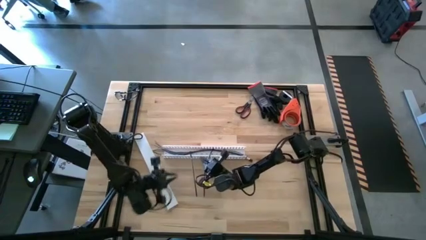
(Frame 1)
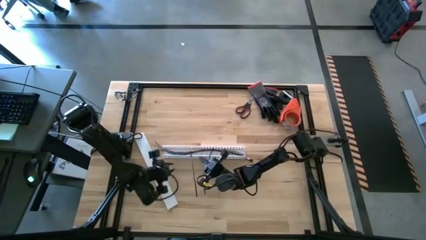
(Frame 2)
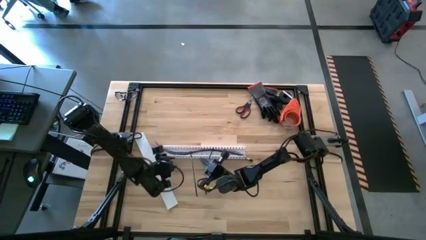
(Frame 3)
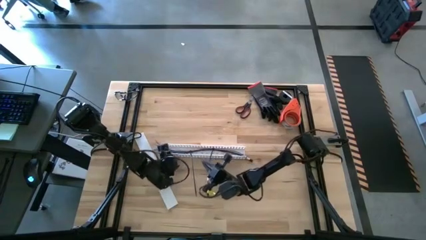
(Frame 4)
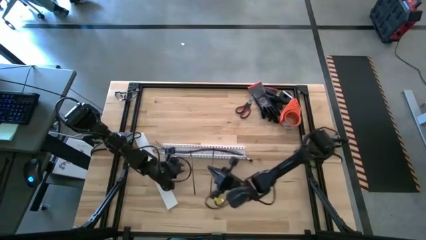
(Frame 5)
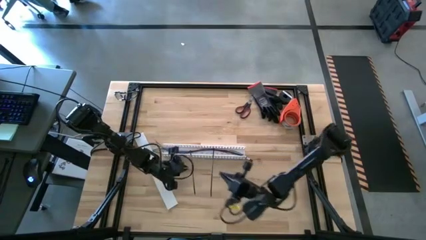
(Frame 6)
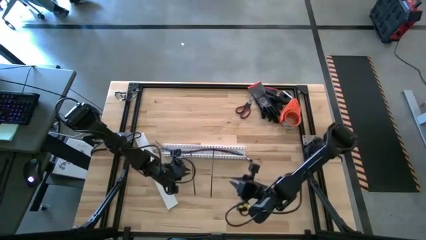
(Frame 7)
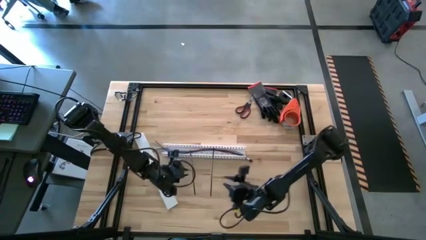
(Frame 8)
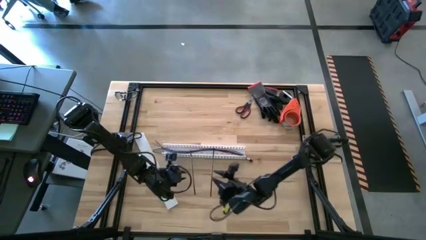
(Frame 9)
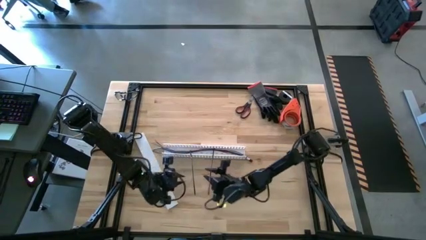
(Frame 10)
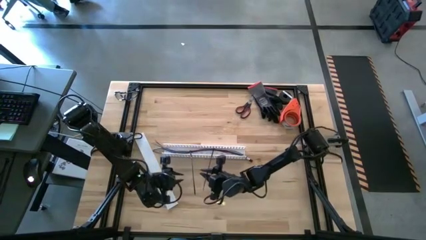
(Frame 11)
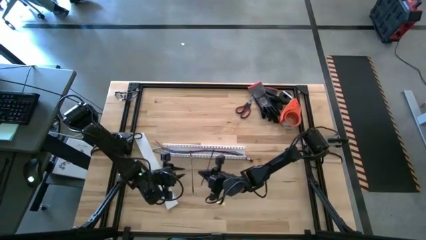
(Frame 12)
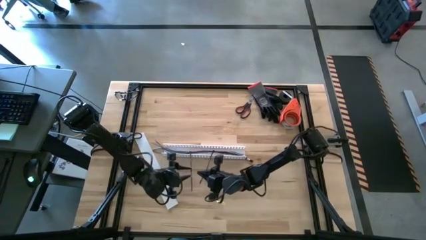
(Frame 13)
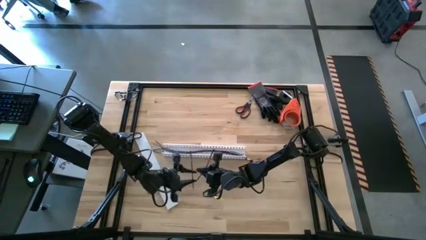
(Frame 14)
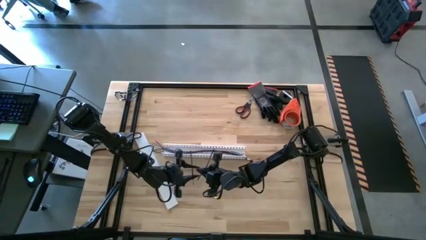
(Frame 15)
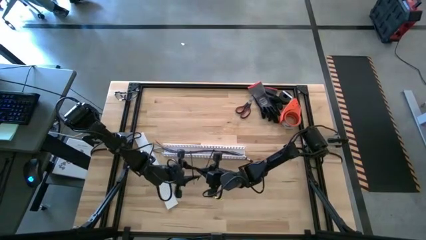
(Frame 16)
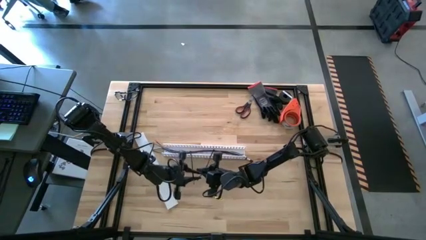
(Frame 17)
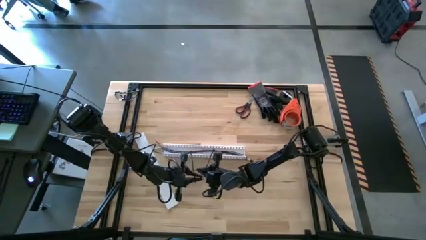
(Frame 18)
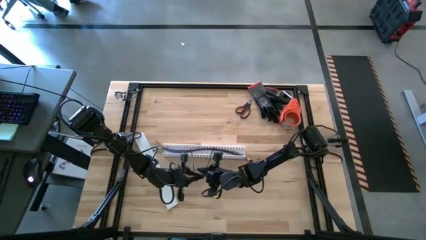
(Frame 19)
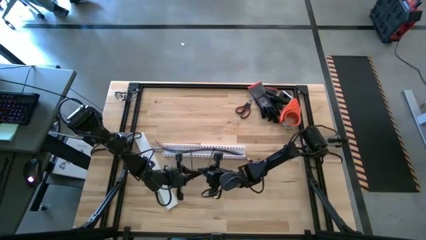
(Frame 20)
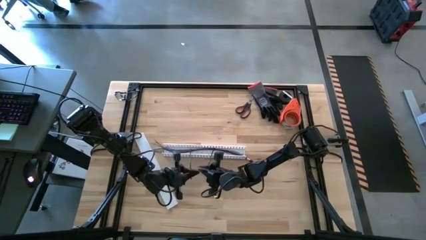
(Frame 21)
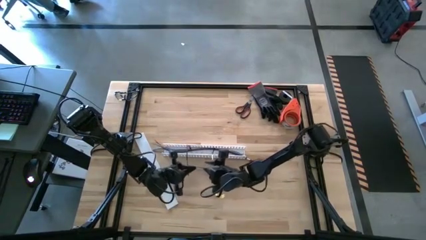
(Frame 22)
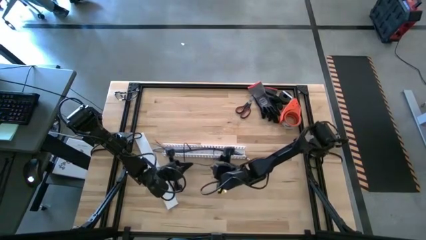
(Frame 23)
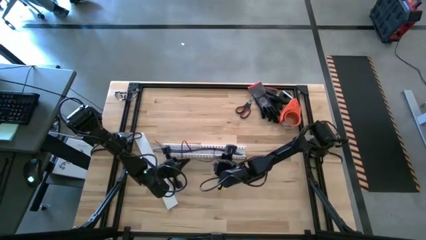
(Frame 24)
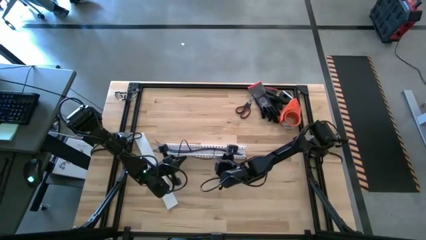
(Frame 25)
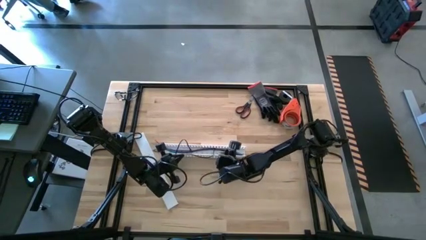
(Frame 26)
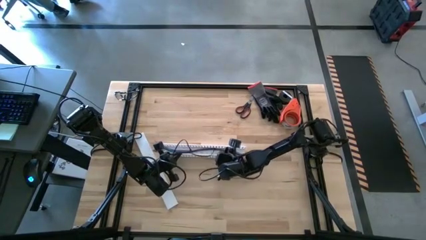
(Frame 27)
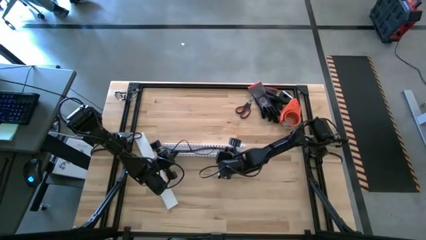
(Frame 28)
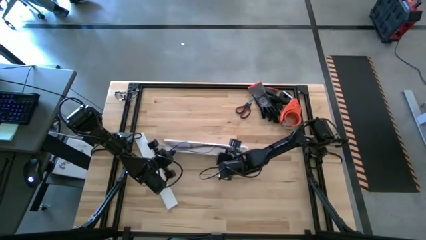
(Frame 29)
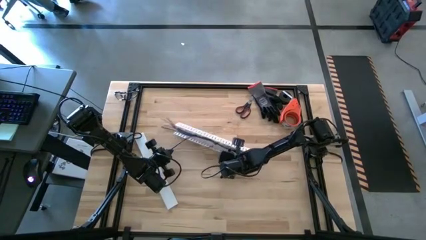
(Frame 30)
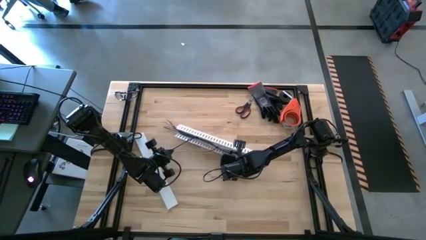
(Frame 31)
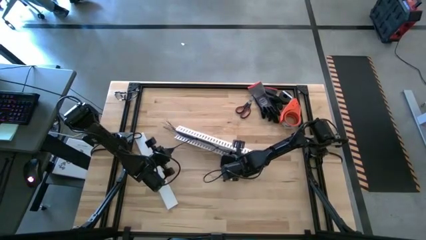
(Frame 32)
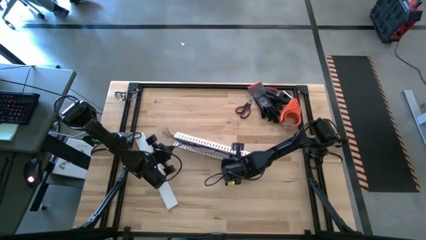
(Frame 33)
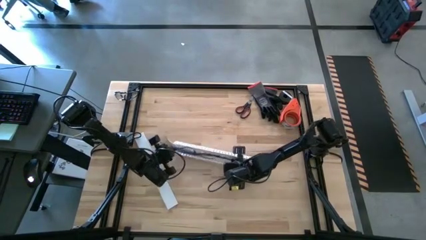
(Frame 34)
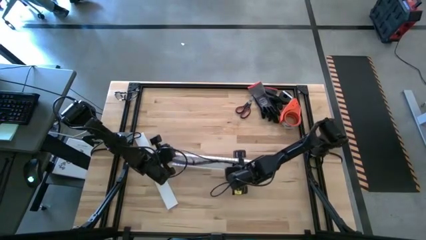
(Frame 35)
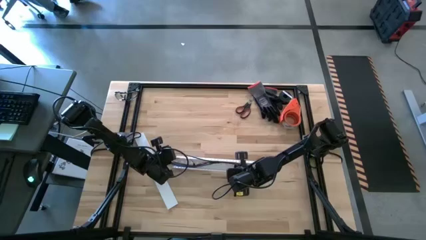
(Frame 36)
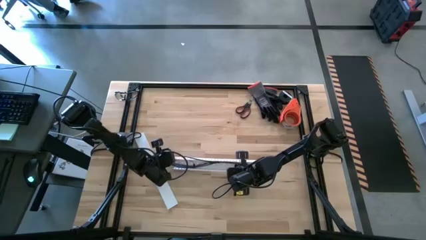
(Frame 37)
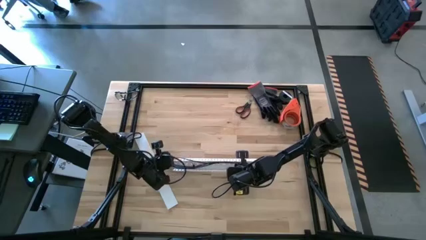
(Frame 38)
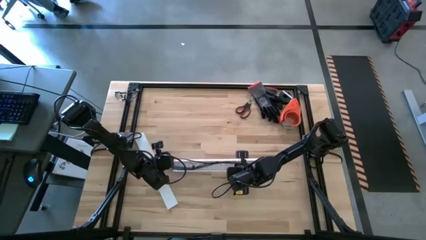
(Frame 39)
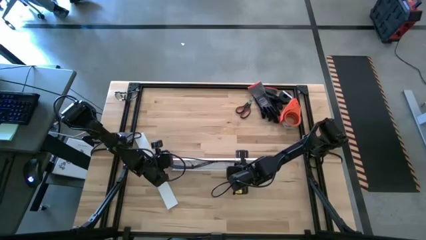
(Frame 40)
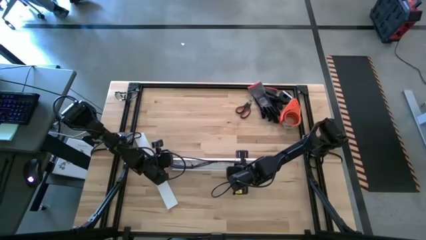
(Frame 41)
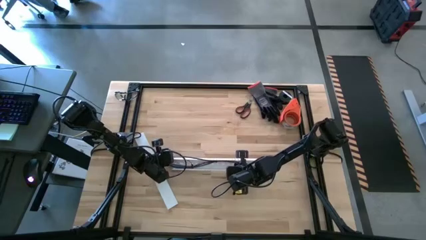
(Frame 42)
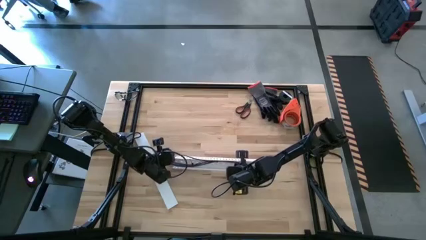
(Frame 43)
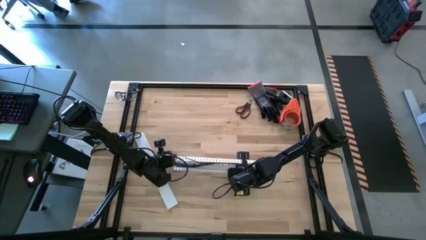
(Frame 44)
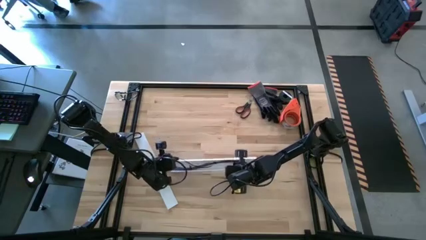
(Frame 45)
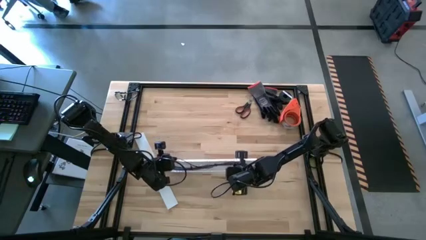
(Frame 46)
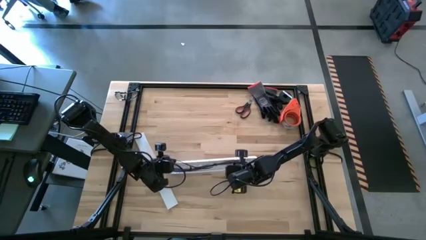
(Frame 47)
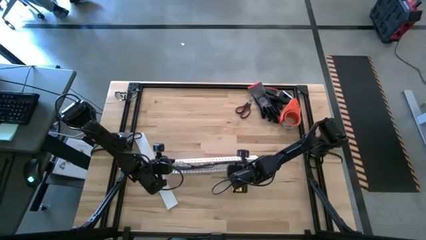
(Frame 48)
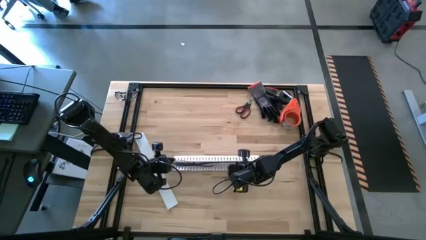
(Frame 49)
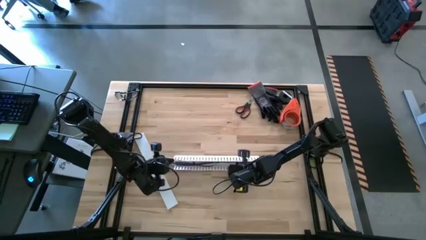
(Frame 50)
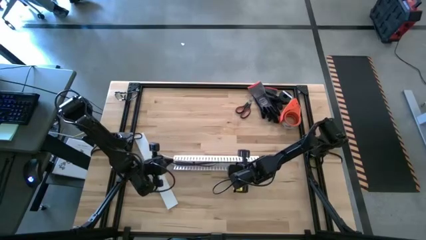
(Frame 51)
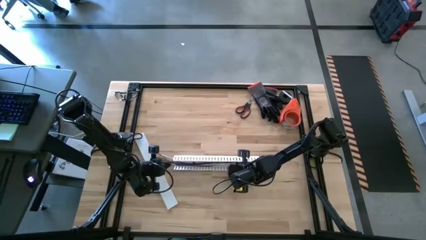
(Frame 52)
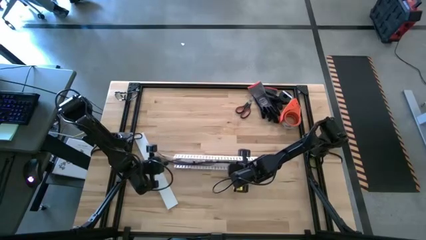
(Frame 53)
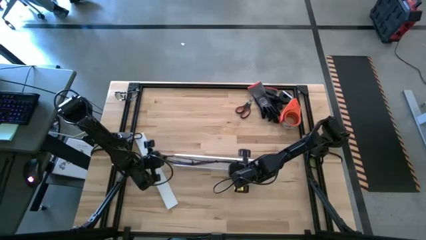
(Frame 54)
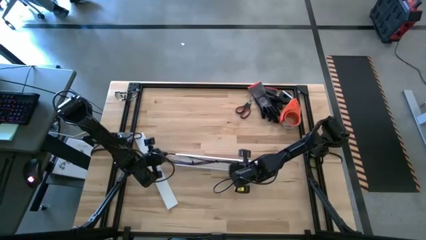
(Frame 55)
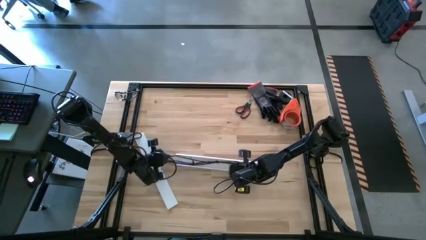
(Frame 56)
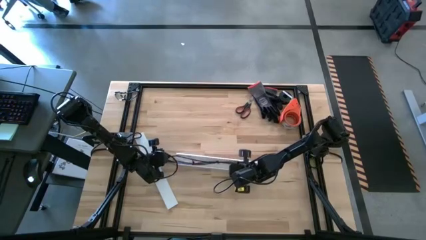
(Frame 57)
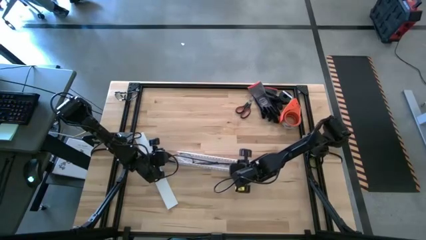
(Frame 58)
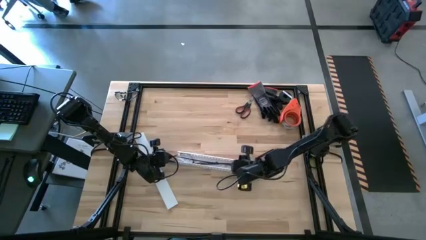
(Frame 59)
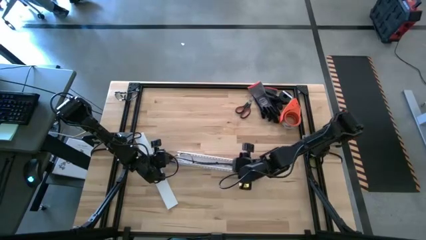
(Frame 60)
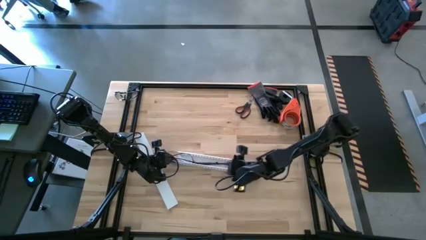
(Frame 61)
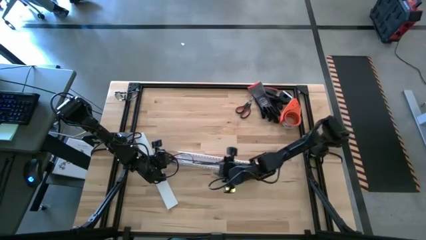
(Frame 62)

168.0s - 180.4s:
Task: Ziptie cables
Put the cable into the white cable duct

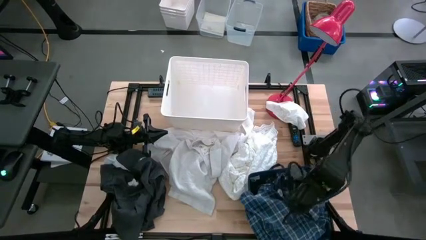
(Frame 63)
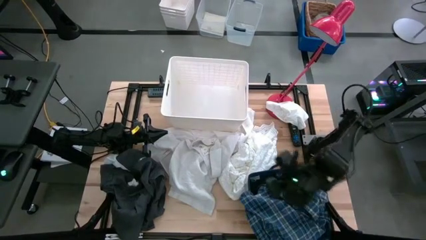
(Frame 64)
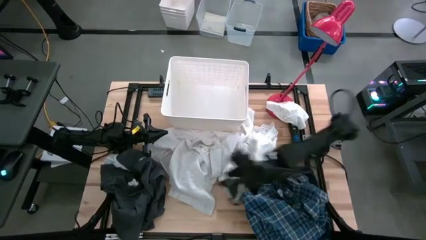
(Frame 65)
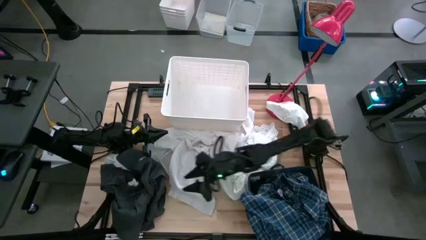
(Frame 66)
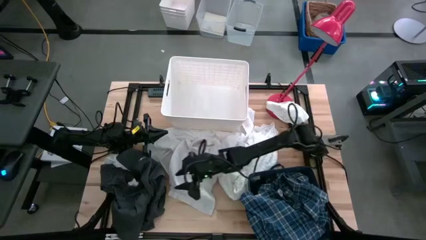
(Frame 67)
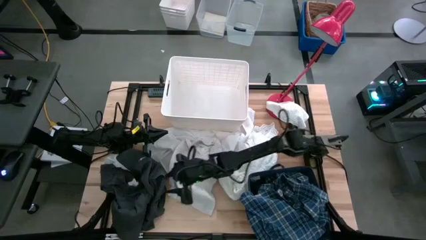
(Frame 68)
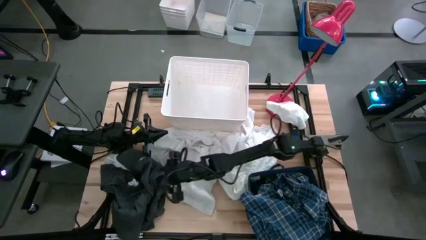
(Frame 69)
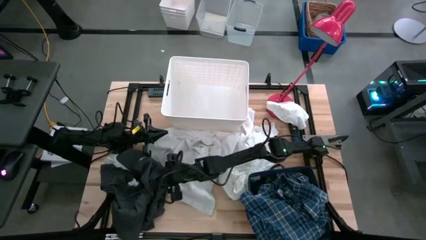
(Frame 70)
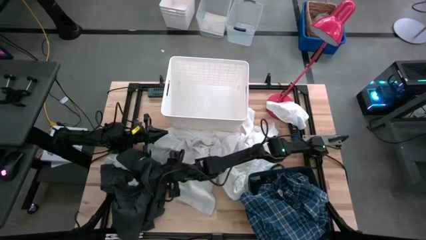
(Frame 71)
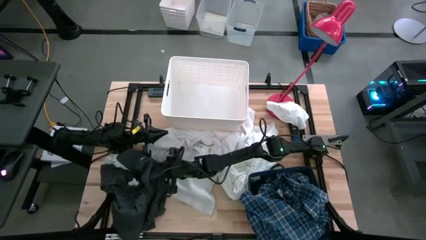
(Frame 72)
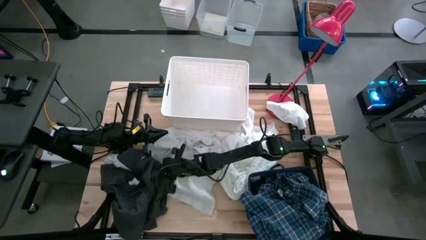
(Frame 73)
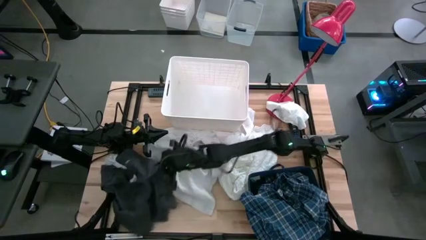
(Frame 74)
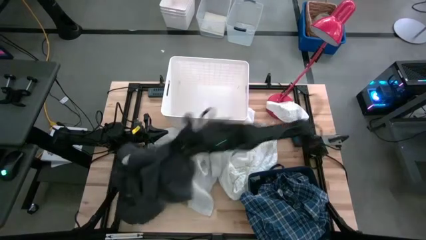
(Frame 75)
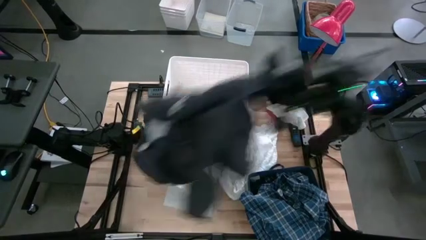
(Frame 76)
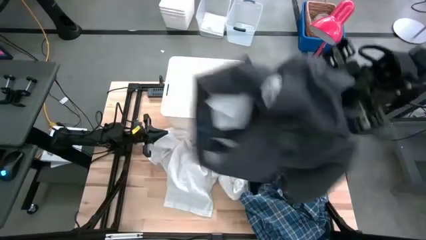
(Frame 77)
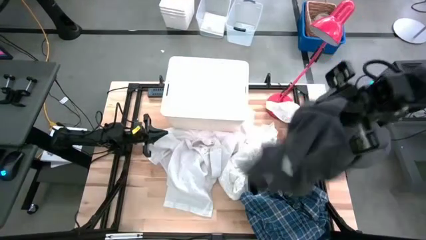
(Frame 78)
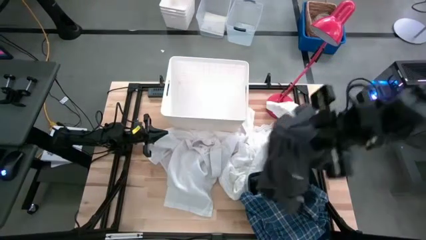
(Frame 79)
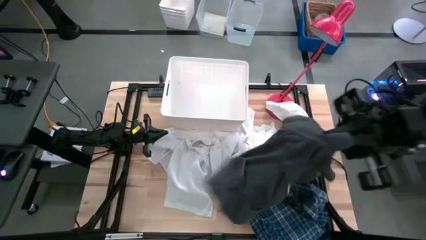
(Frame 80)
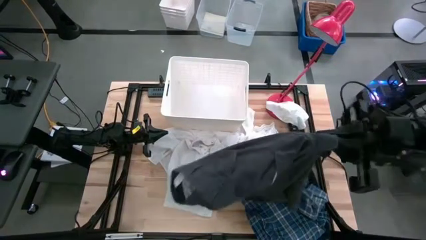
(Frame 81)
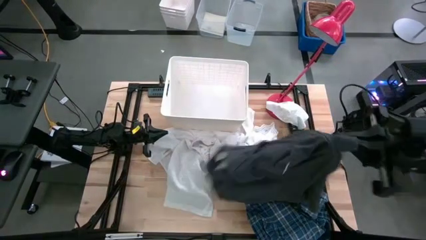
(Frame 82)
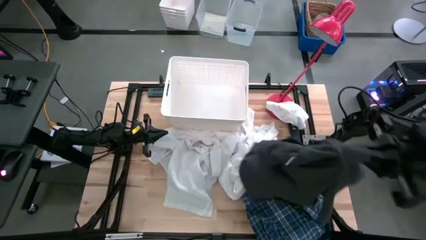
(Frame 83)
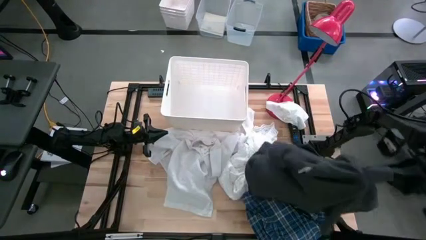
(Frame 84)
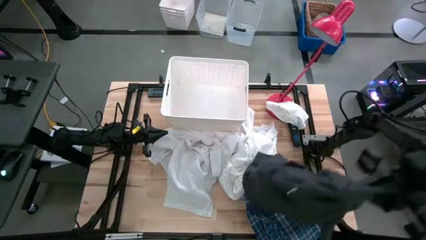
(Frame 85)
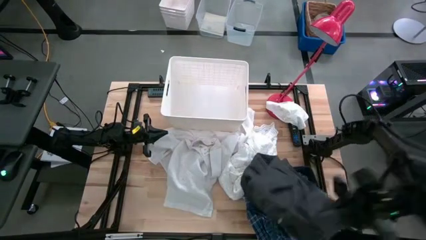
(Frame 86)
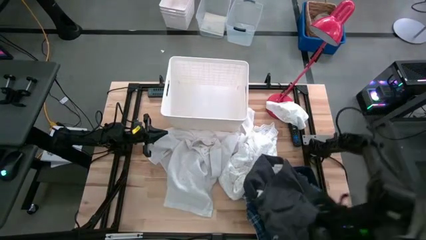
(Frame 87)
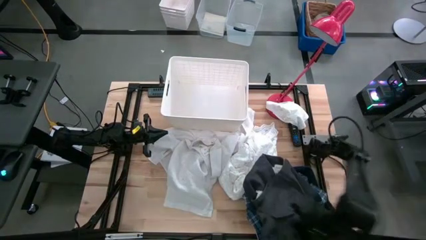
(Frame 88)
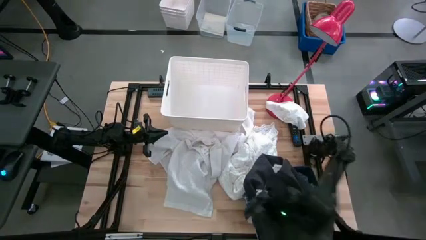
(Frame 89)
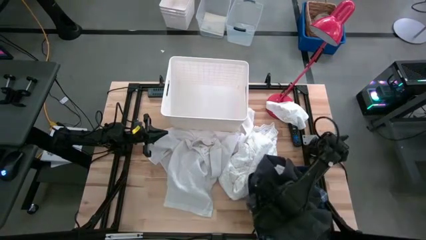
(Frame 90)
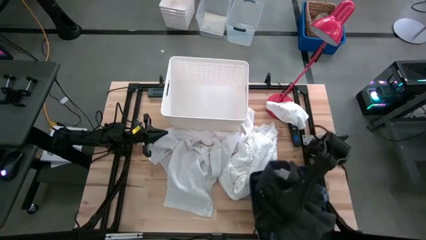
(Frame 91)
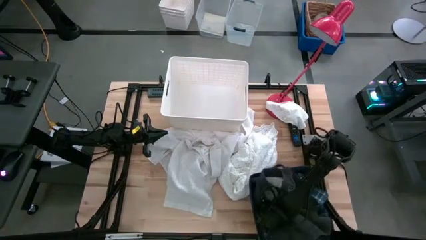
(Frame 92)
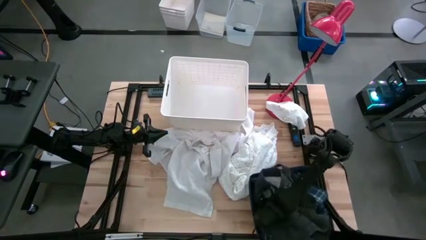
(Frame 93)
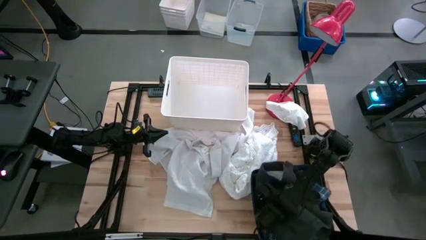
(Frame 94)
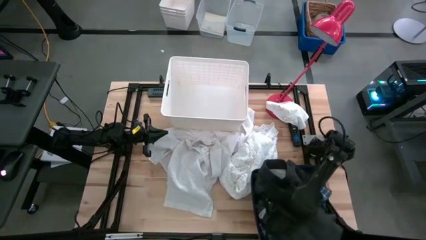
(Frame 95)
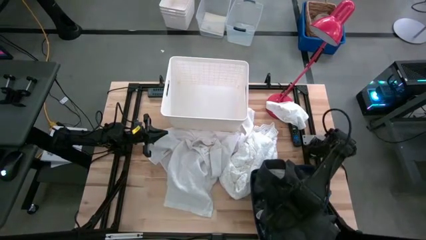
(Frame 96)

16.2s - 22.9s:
Task: Sort clothes
Put the black shorts into the blue laundry bin
